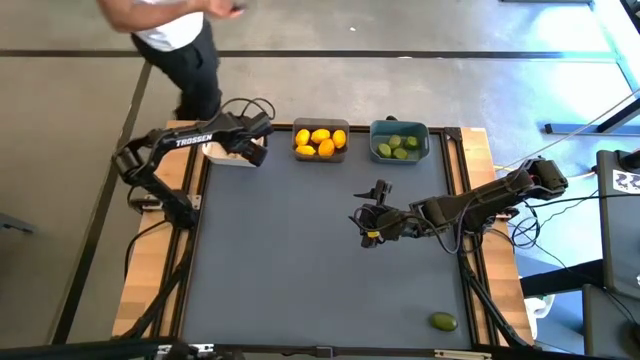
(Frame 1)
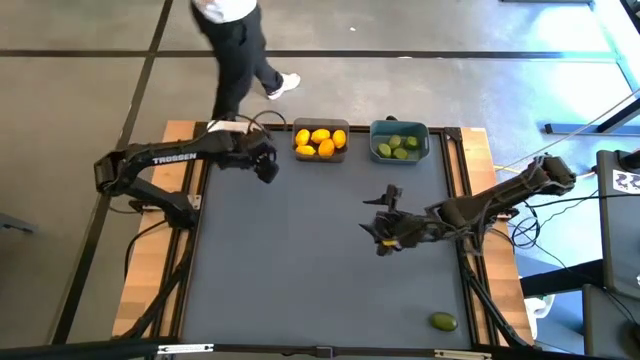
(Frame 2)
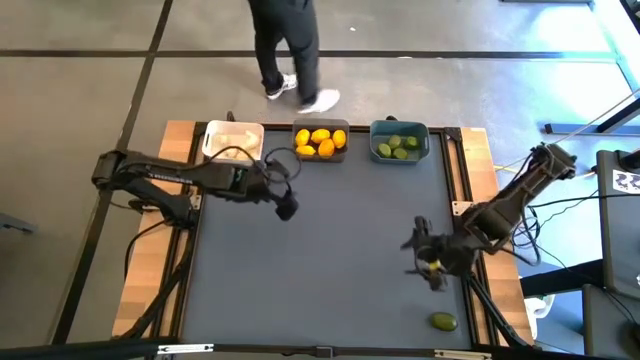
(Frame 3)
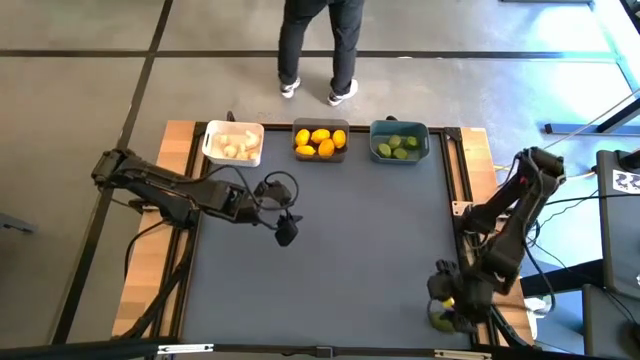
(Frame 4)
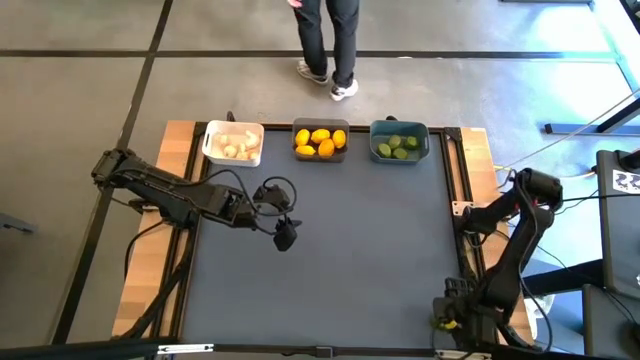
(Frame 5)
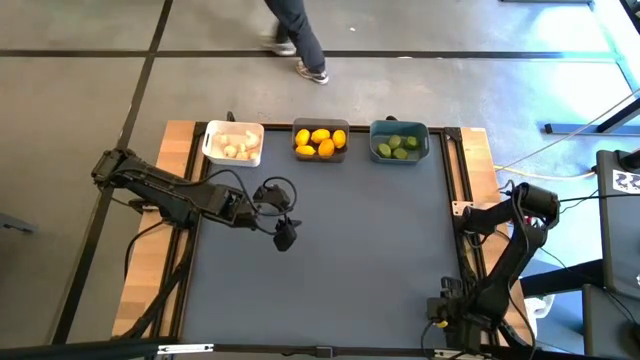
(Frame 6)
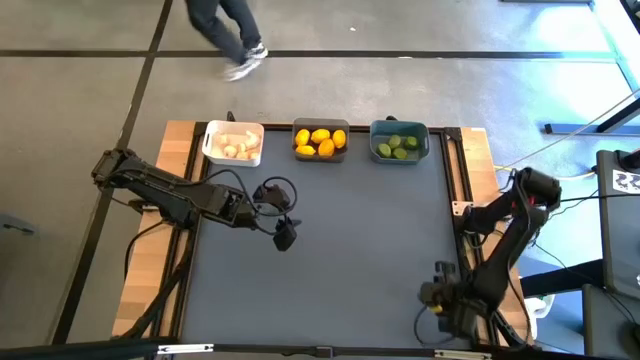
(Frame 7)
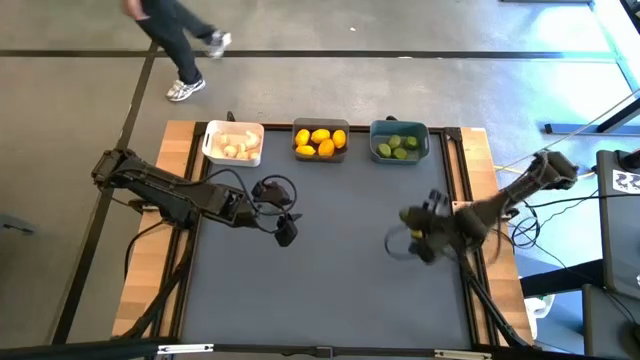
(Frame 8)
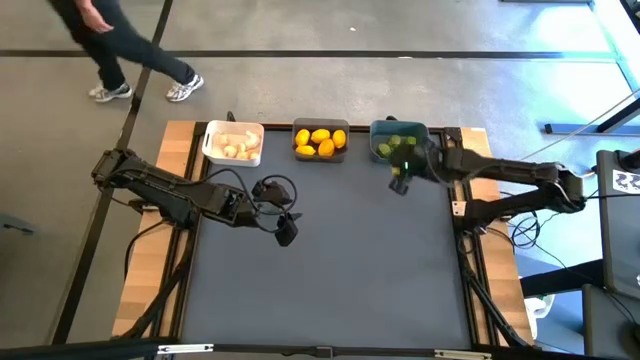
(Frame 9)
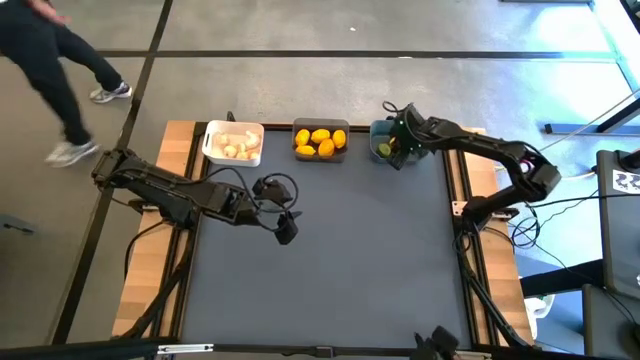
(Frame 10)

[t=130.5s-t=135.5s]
Task: Sort produce into baskets
Put the lime into the blue bin

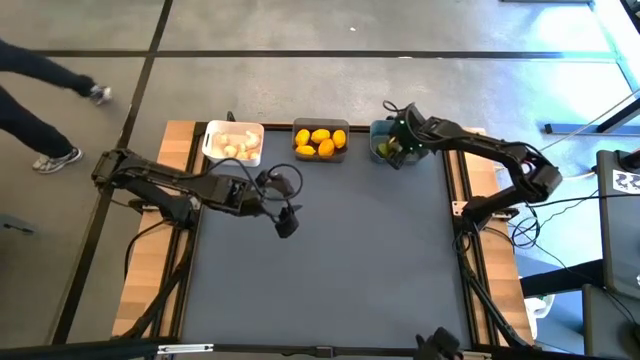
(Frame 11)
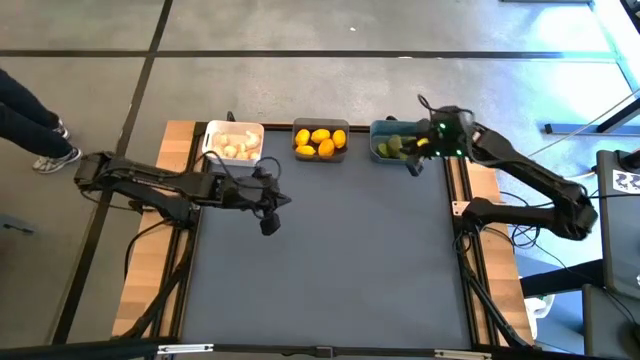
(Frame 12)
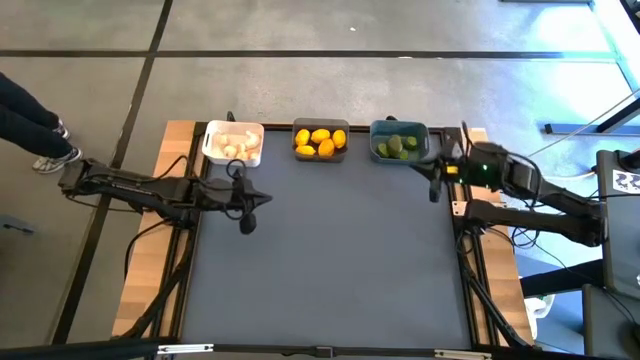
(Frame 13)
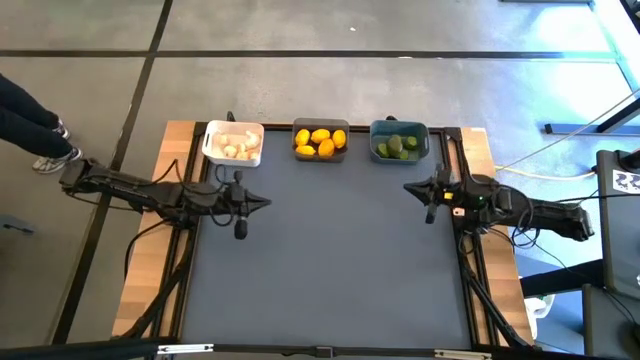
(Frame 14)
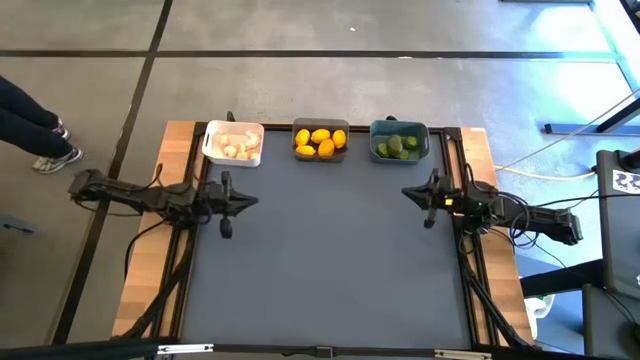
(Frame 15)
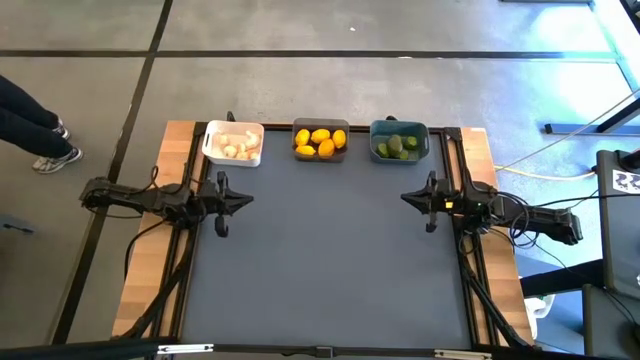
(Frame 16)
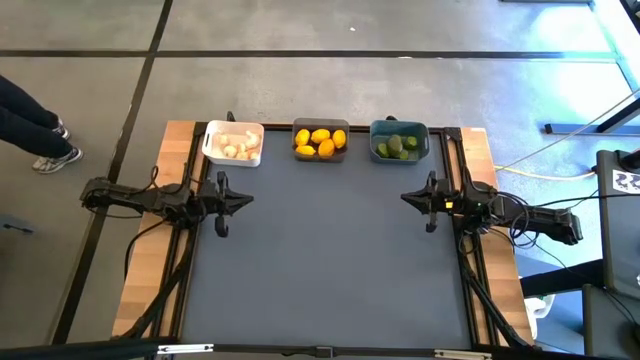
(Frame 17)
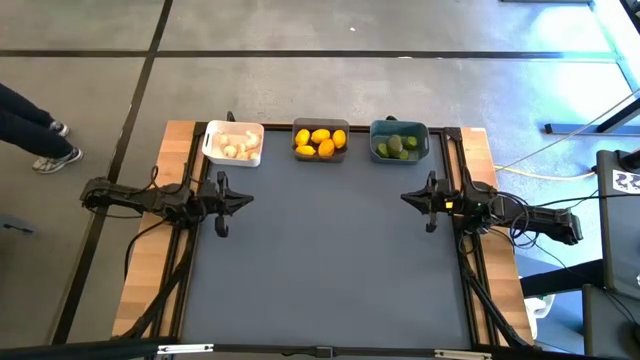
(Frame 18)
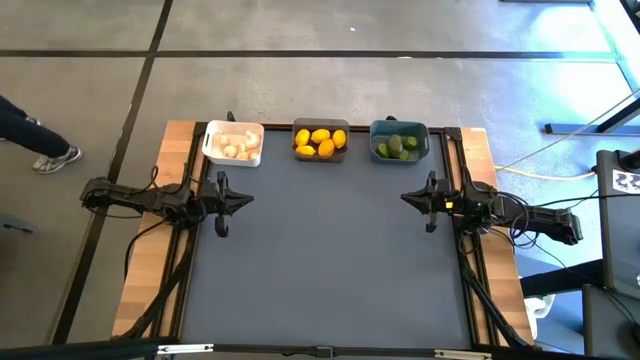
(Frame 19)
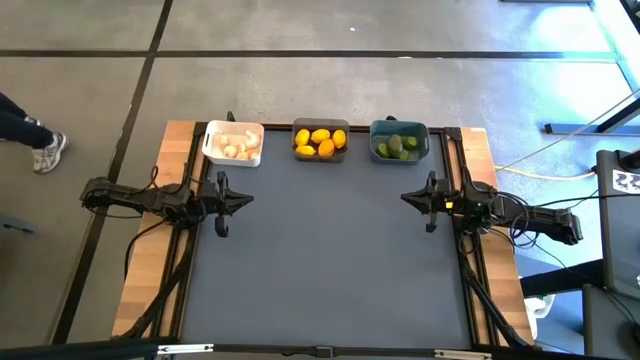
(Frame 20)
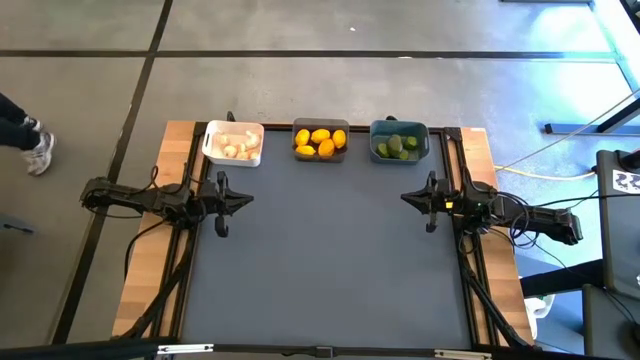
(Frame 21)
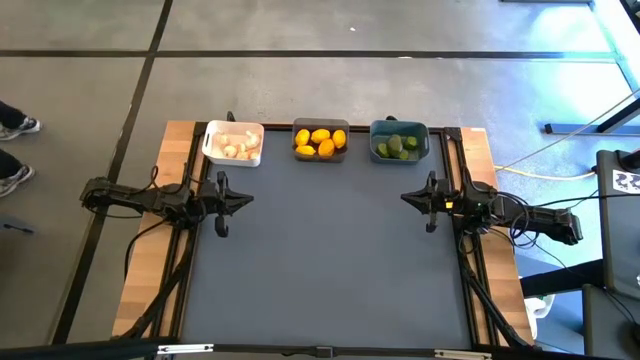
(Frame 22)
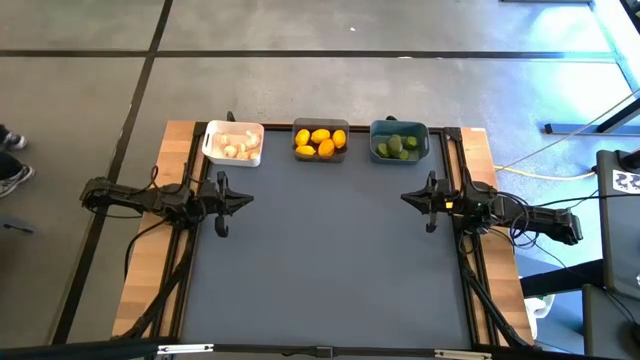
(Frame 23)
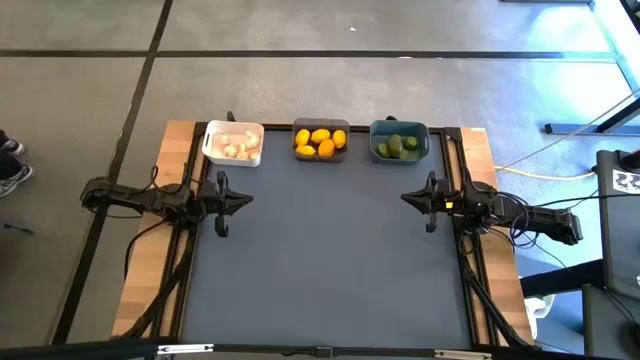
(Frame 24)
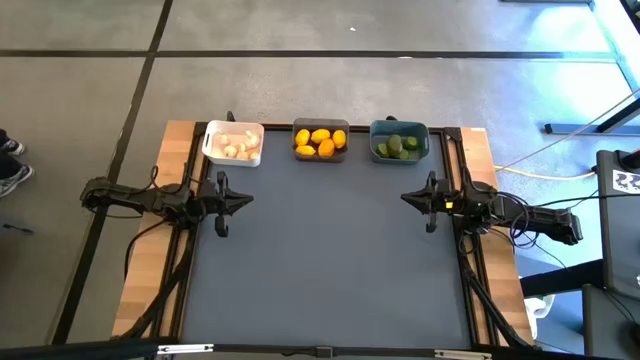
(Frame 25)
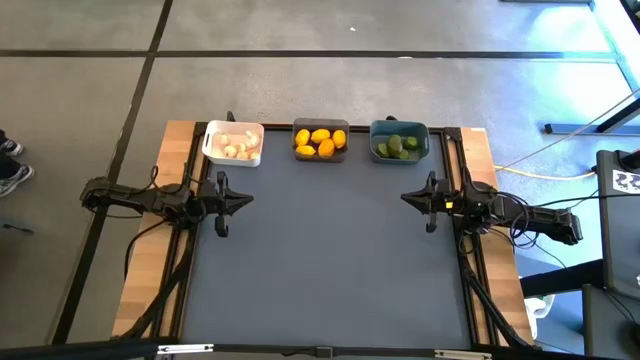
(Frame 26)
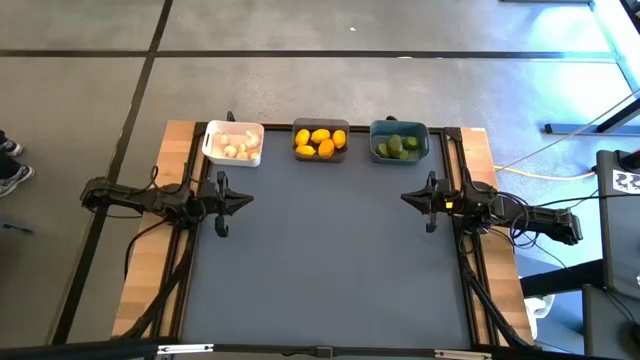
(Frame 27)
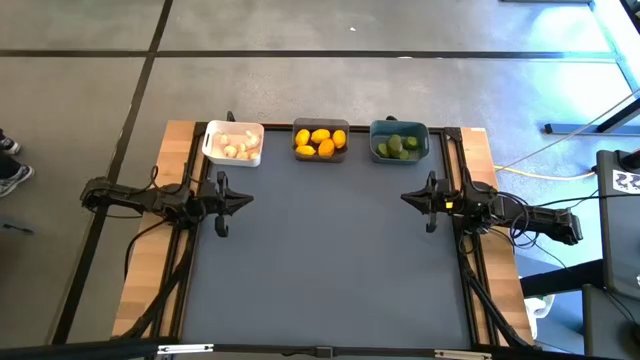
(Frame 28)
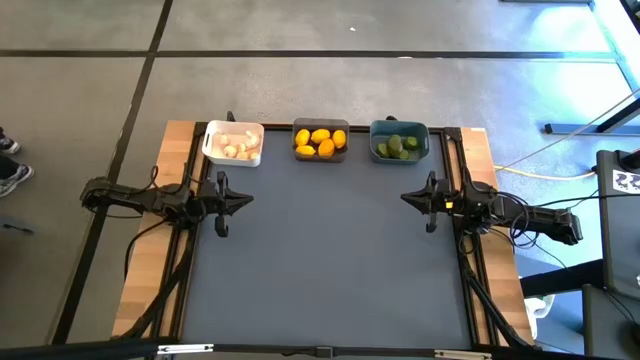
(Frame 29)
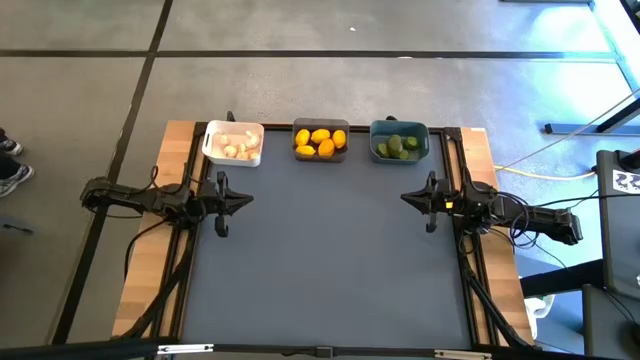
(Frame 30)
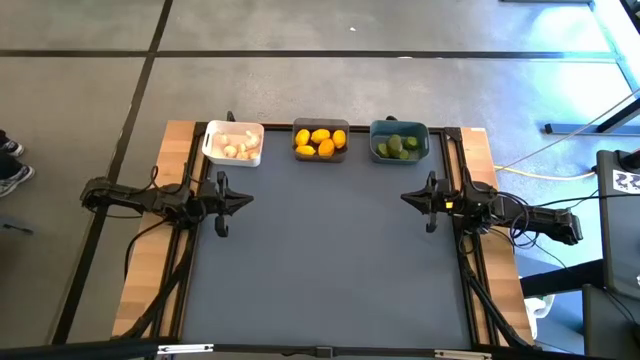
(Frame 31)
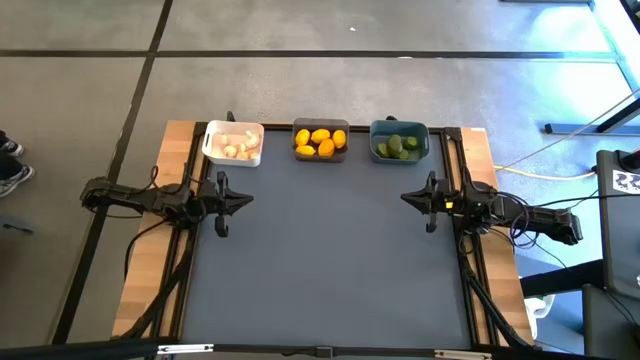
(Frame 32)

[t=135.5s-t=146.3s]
Return to Home Position

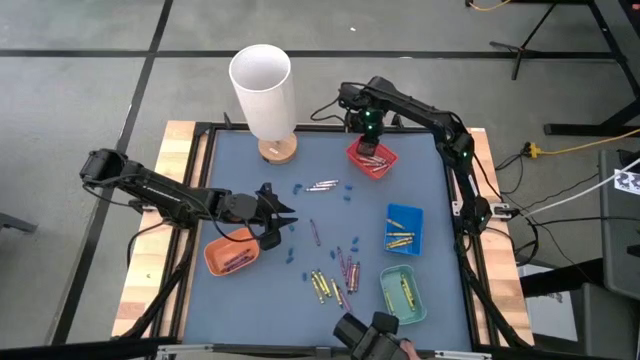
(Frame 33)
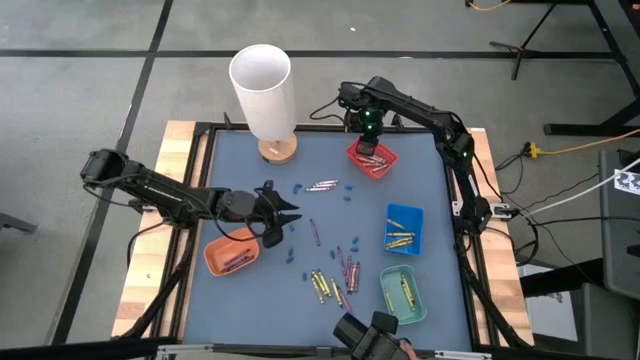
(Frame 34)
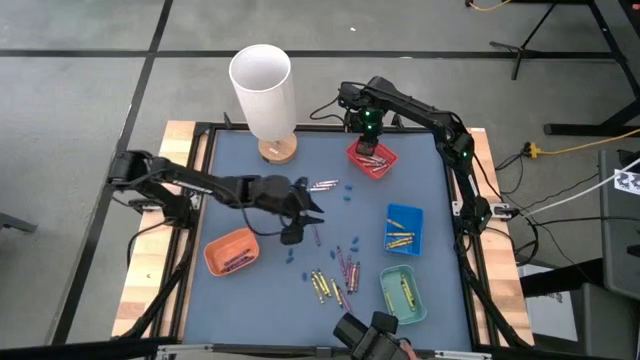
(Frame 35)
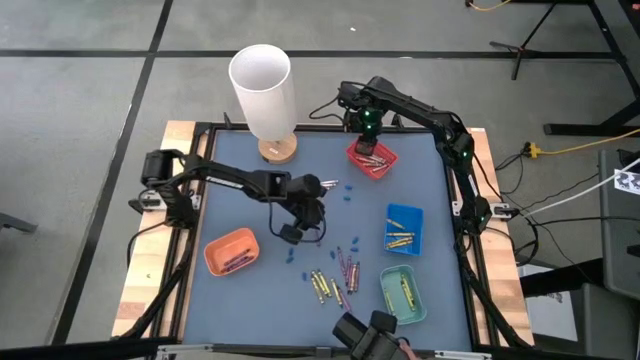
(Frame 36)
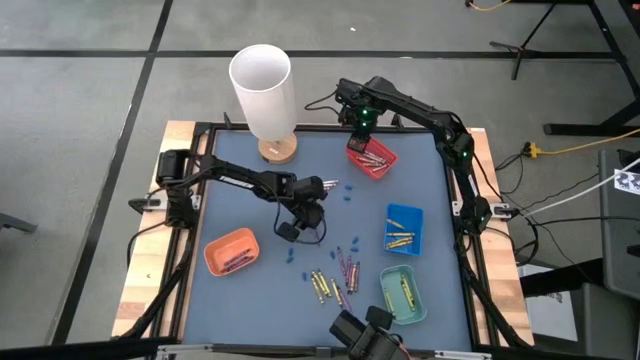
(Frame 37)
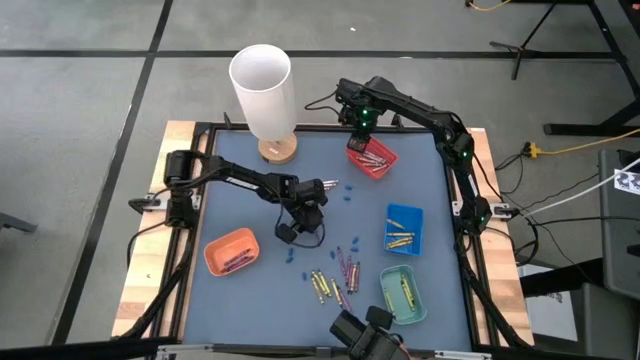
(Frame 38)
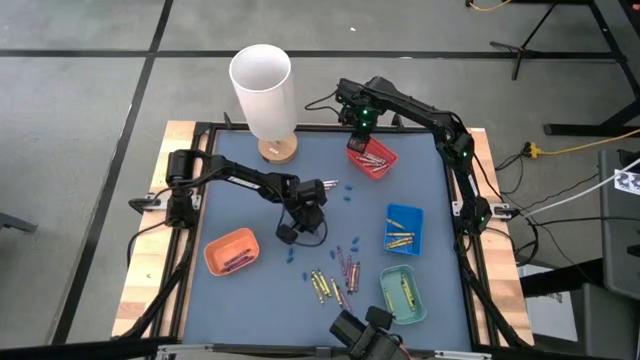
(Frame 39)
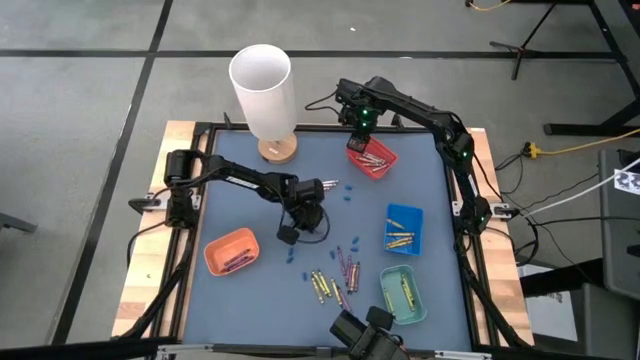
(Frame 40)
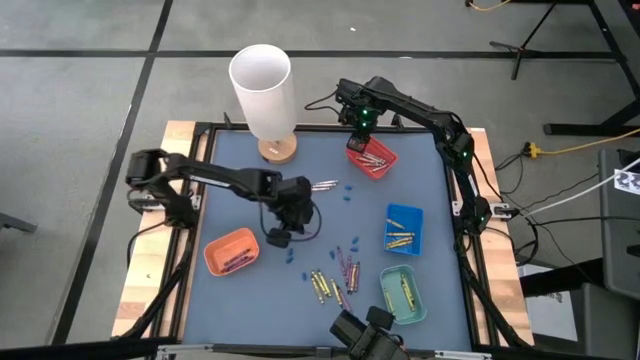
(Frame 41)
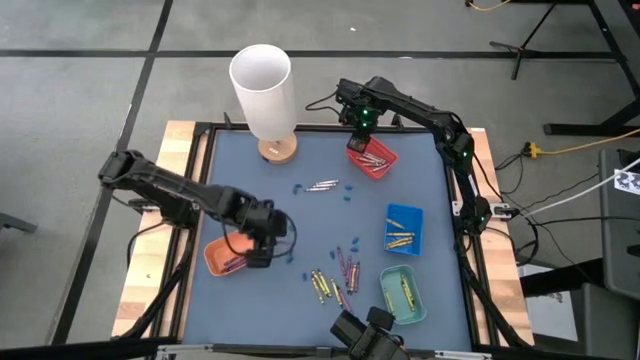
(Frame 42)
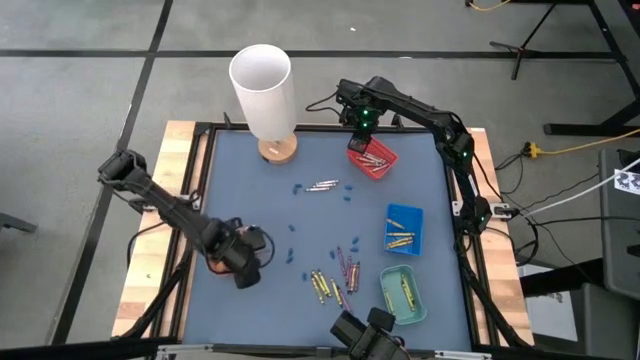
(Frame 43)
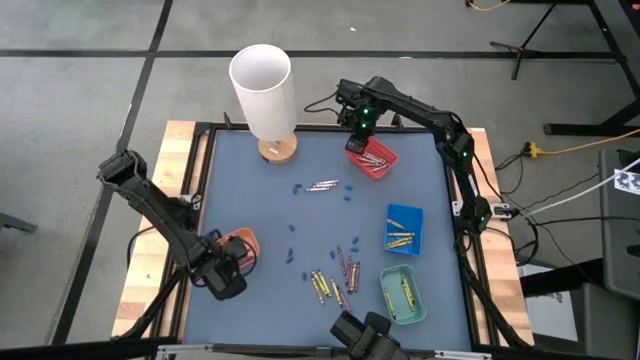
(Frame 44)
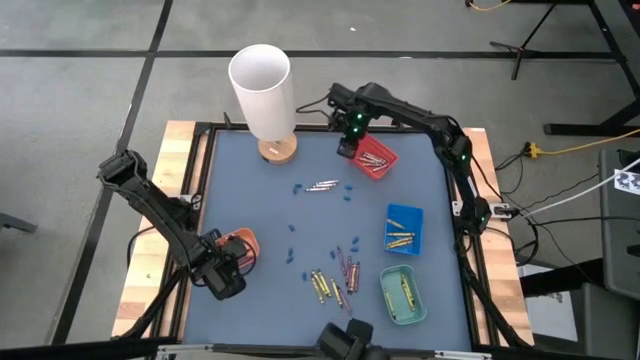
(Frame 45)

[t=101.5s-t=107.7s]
Task: Sort crayons
Put the violet crayon into the orange bin
